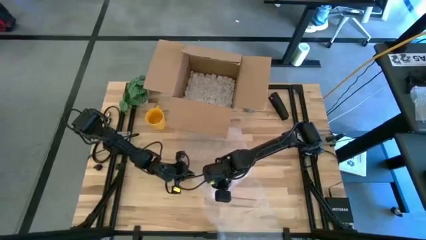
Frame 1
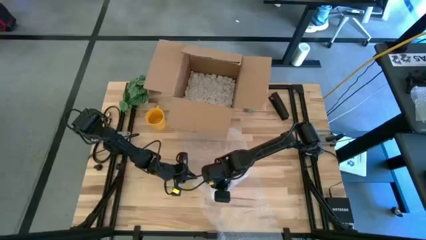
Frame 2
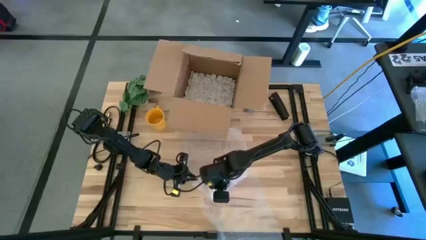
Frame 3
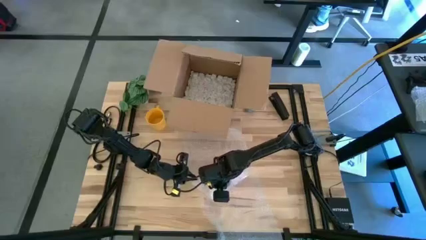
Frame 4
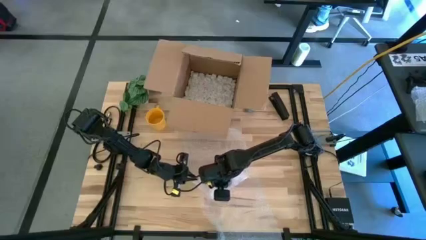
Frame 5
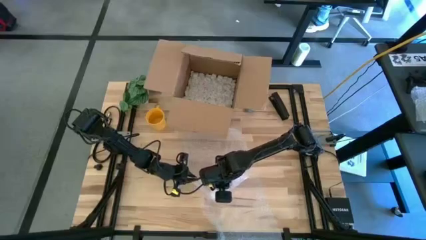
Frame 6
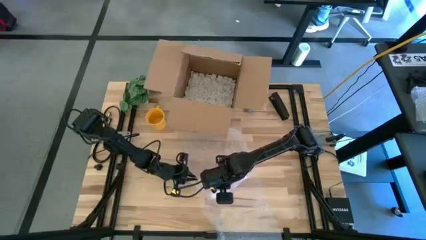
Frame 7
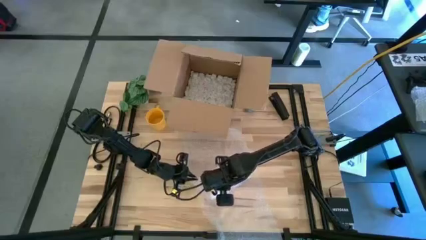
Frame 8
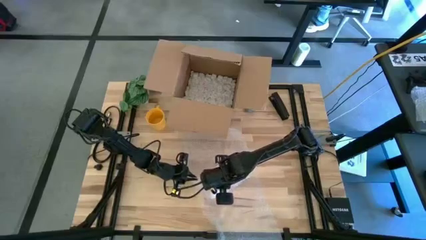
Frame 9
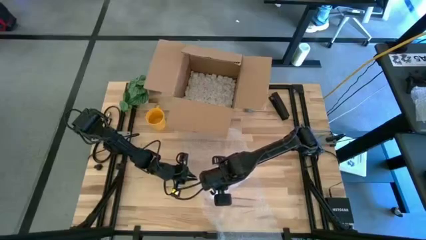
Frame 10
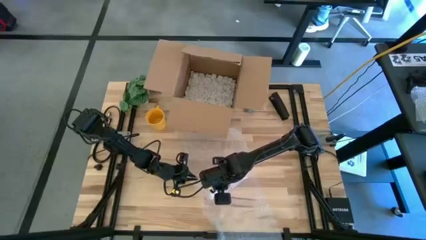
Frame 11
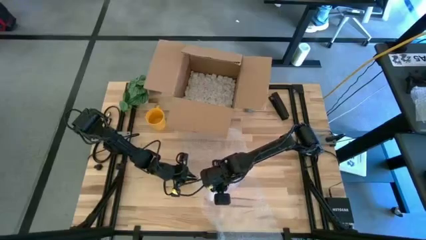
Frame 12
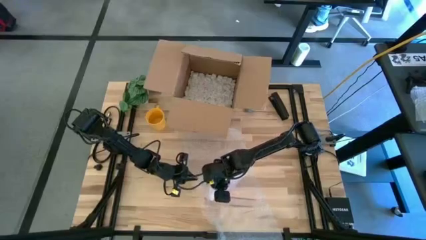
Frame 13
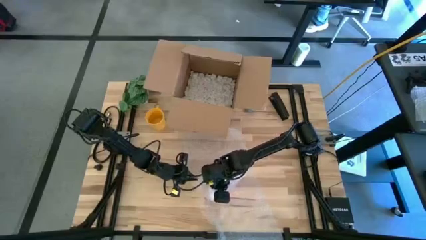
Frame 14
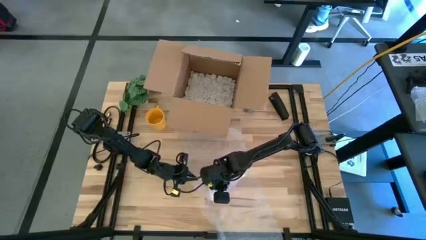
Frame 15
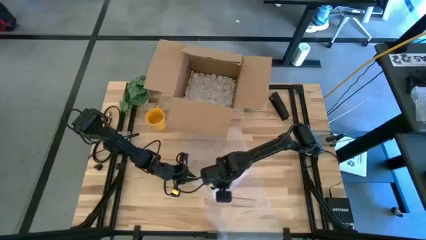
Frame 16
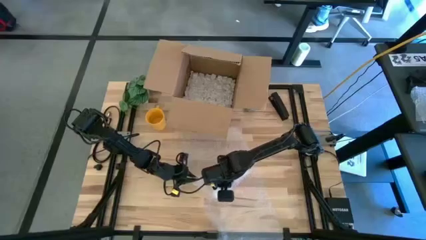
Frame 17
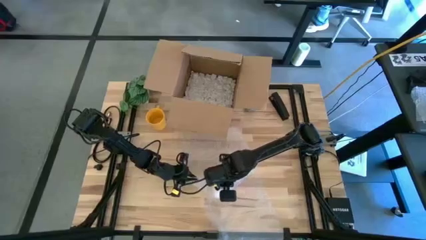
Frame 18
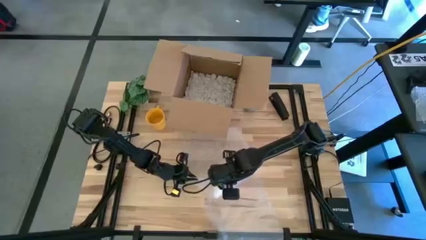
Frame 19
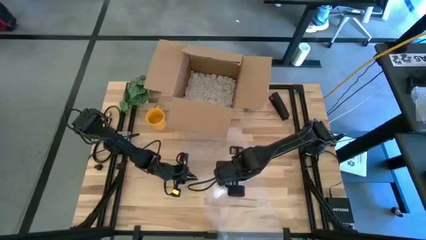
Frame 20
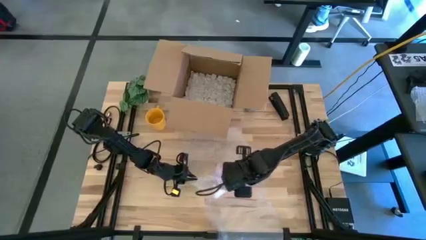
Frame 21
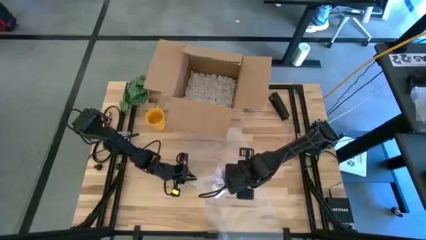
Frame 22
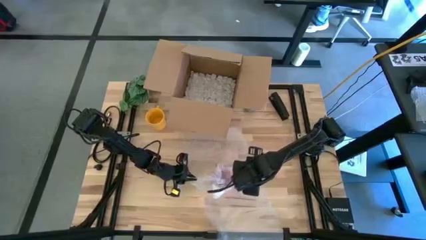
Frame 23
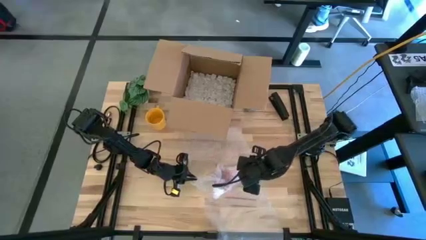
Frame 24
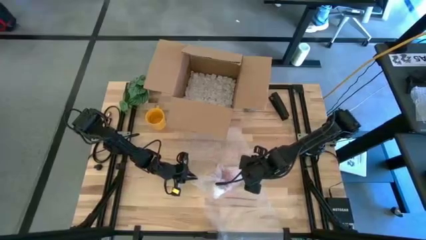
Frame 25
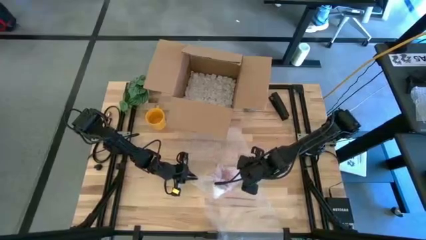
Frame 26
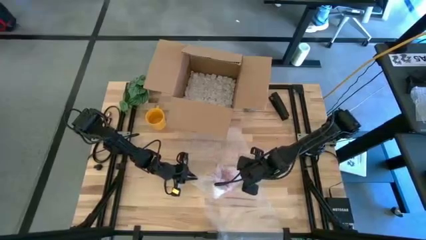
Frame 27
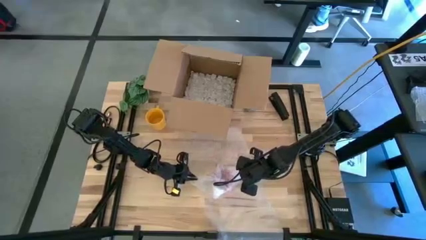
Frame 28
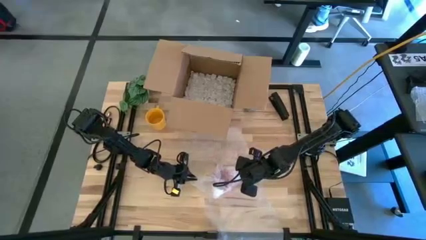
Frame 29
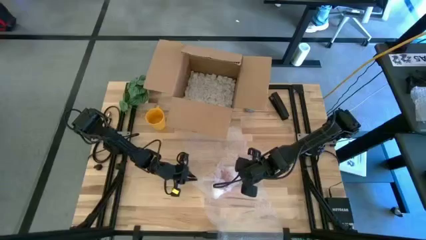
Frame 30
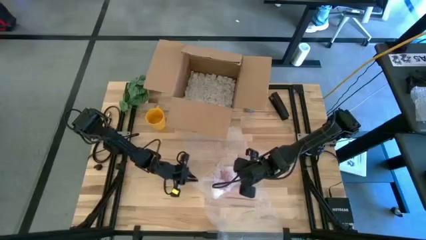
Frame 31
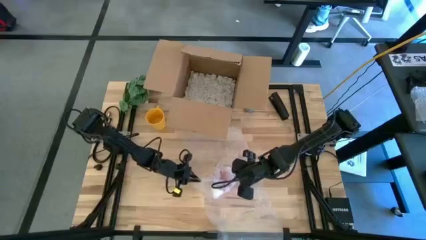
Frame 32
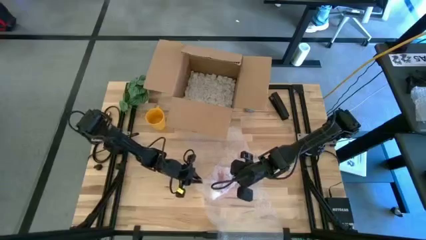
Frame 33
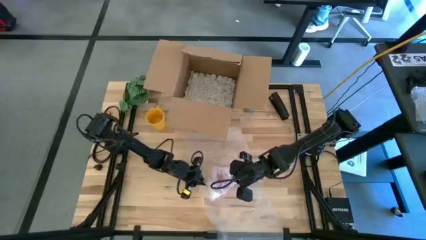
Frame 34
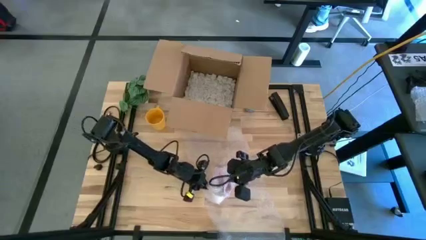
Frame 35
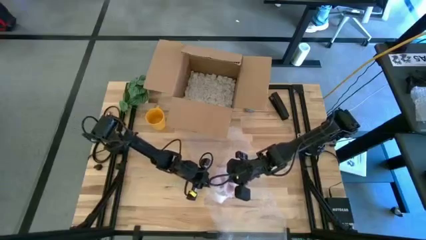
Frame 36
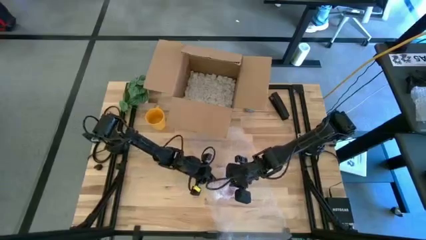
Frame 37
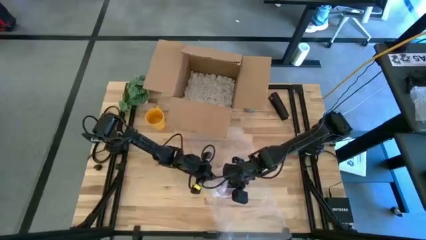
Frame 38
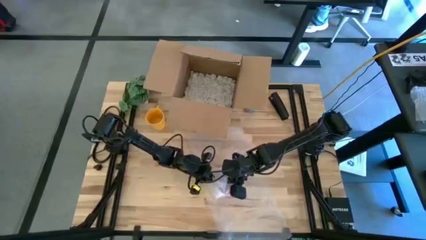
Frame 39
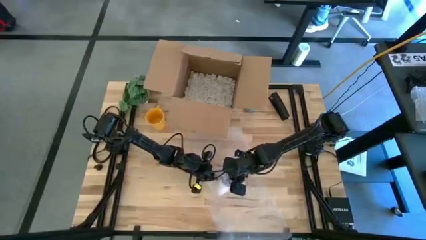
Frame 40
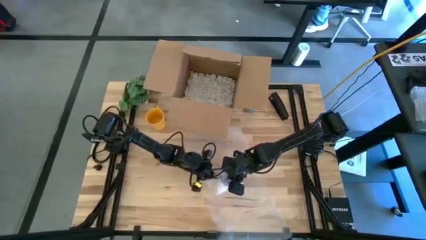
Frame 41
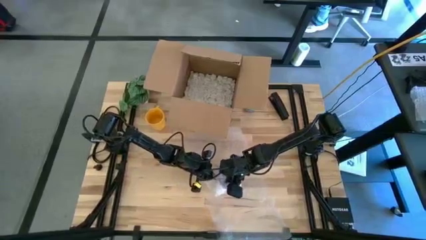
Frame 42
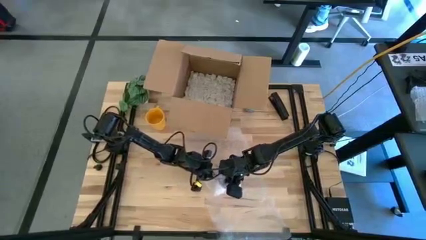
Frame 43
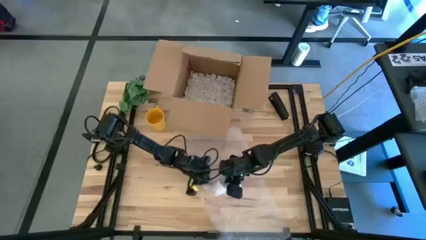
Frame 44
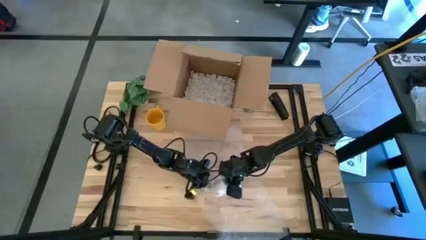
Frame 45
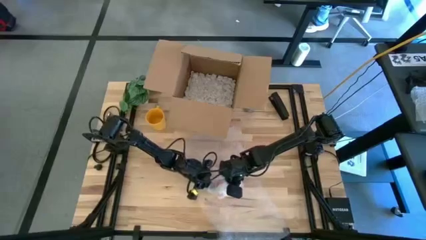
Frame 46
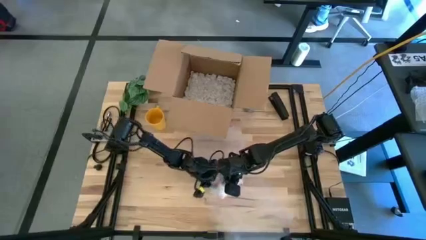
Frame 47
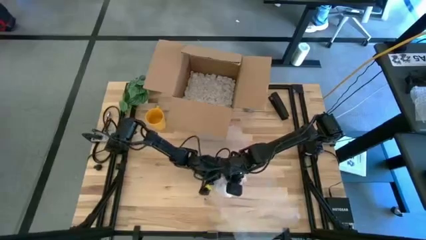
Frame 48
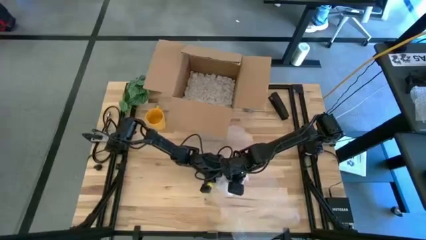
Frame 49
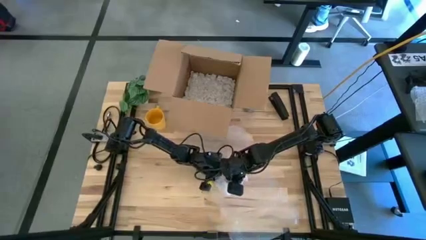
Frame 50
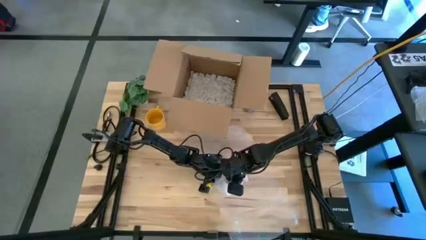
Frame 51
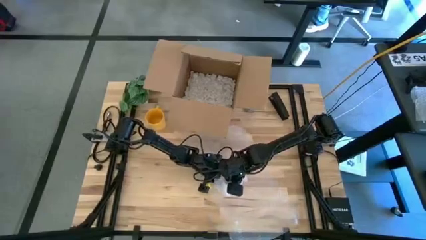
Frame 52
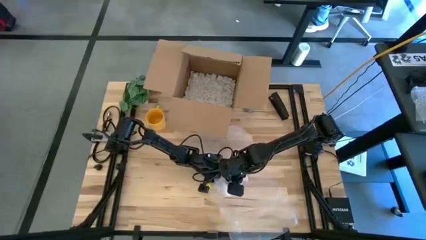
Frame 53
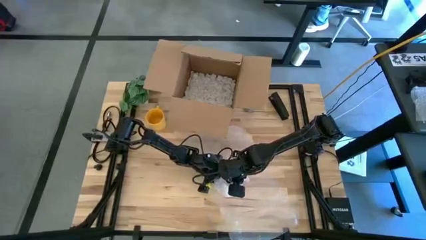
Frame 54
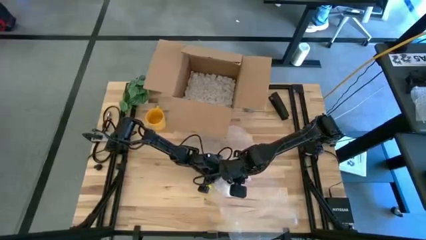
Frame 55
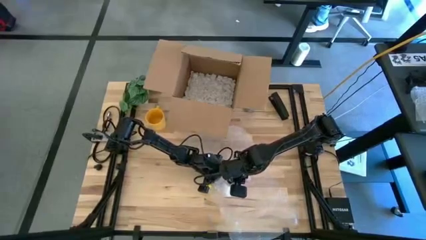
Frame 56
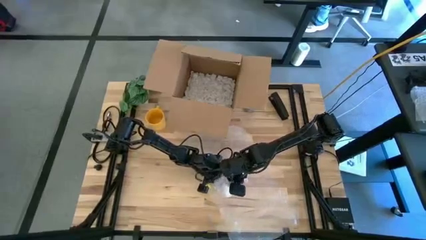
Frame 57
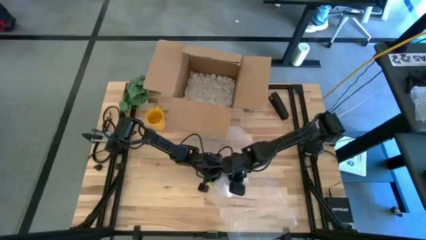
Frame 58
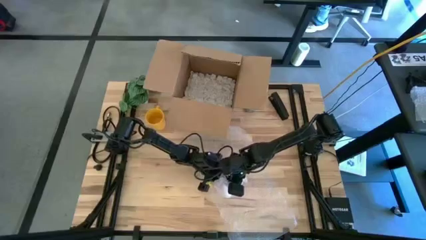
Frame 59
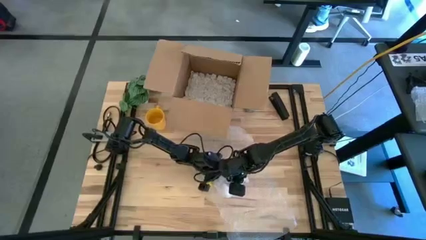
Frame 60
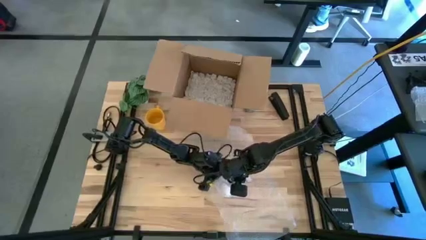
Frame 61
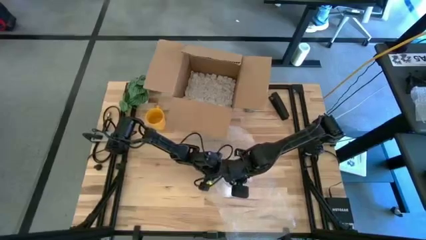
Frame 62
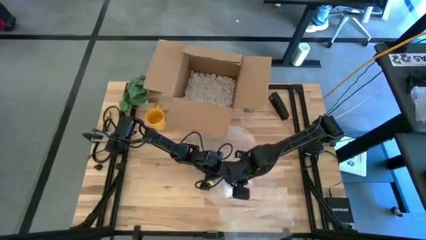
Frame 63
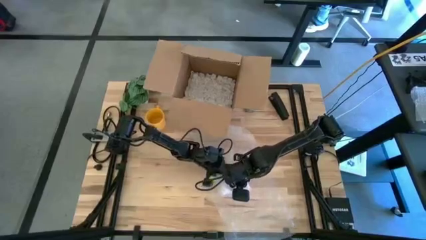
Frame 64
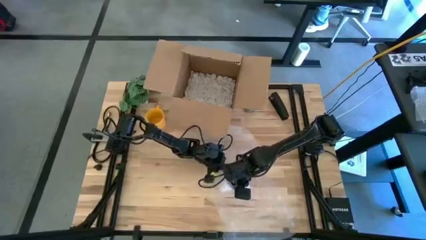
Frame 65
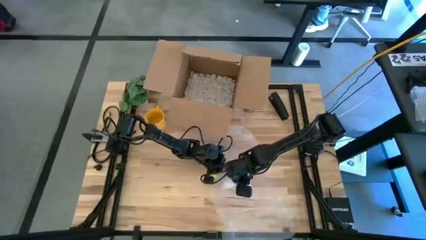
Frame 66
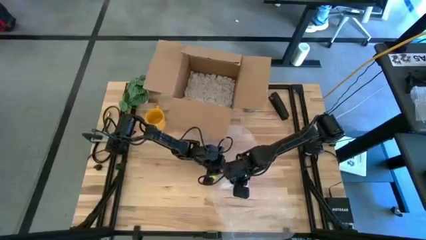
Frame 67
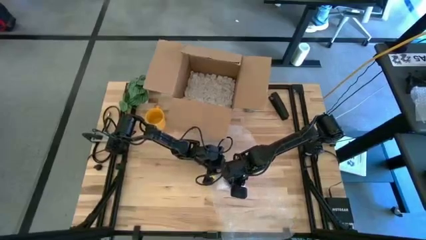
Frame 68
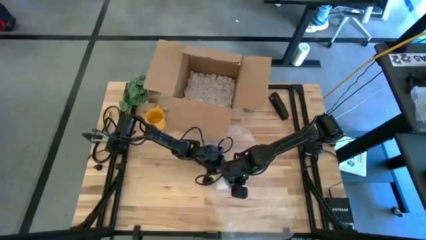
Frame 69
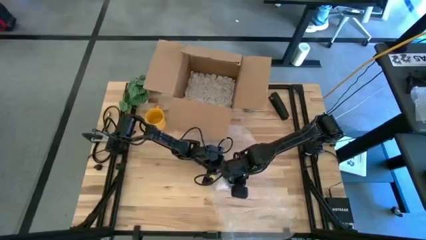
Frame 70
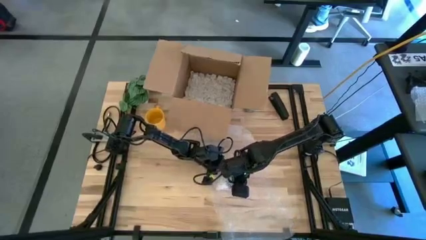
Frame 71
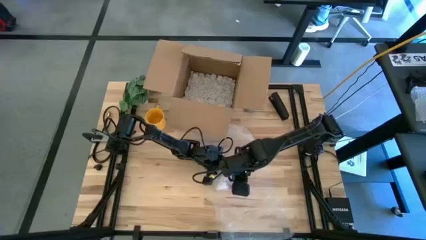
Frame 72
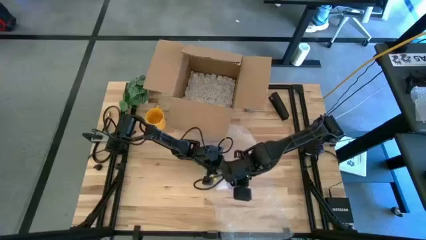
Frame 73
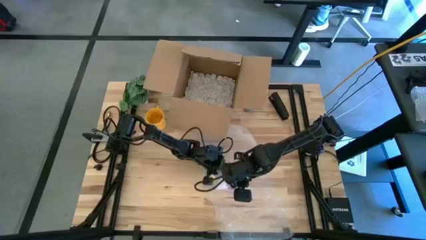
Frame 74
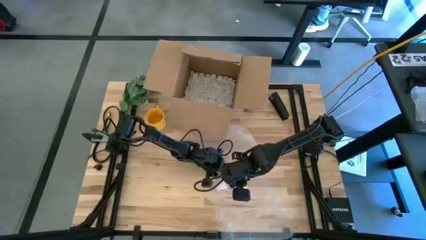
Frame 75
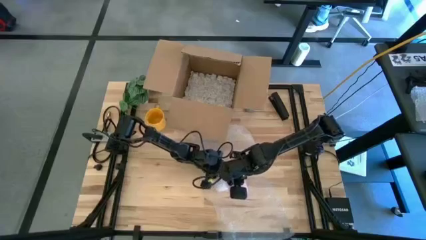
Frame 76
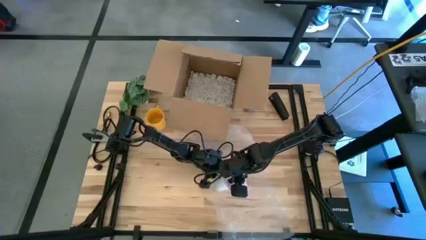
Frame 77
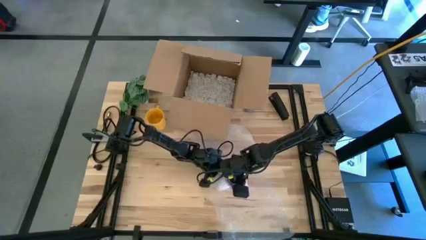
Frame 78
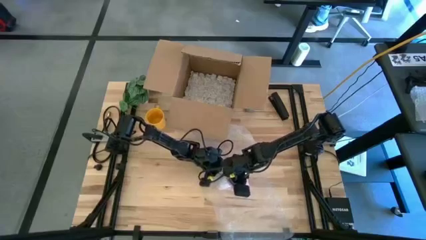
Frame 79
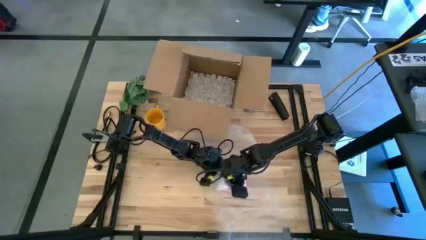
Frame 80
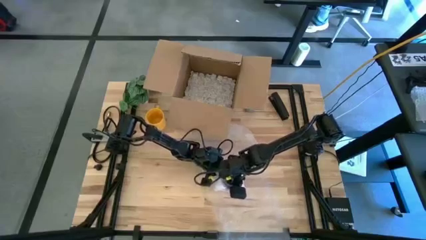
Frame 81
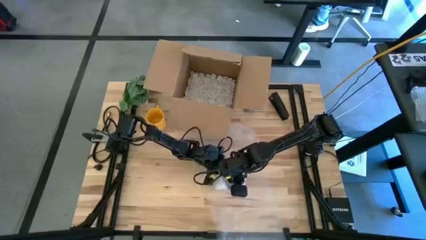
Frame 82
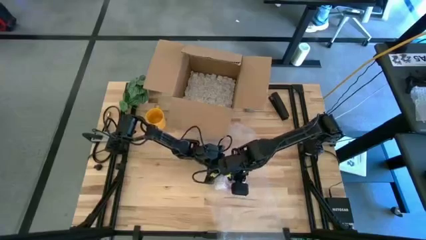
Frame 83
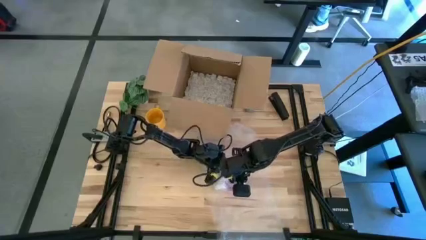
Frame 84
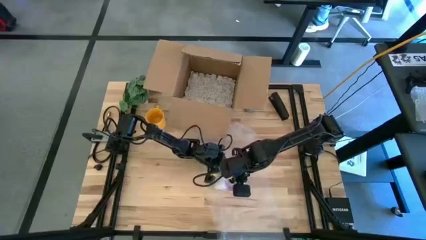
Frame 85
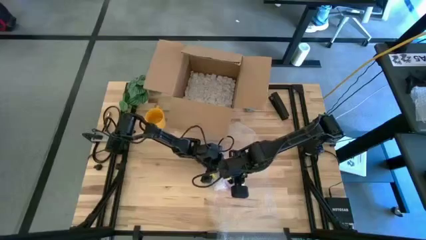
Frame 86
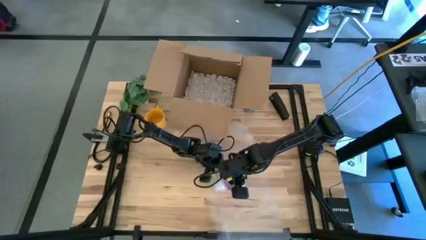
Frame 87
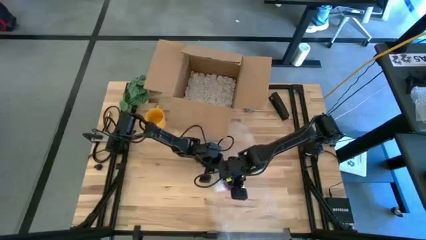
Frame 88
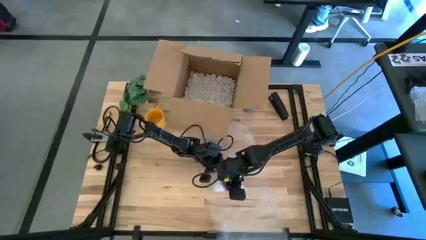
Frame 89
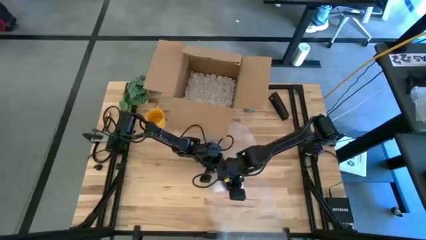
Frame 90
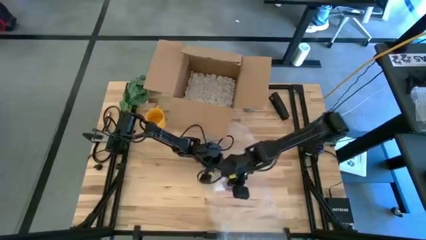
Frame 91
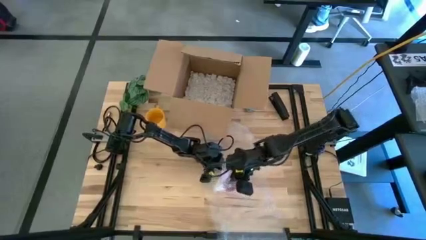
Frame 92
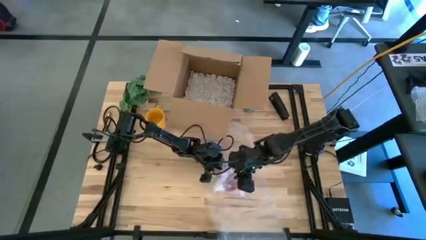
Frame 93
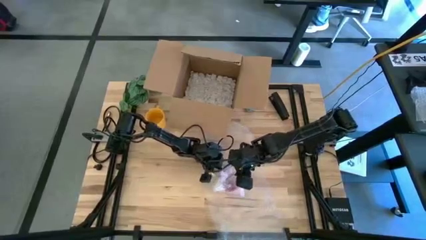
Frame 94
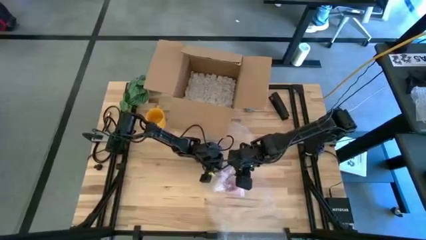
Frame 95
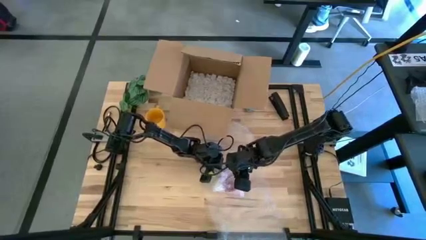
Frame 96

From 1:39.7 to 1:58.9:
Task: wrap mug
Wrap the red mug with the bubble wrap
